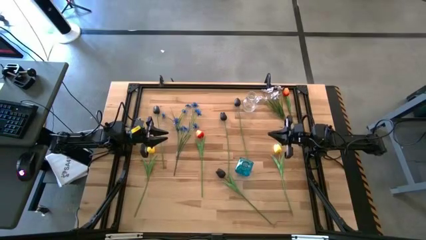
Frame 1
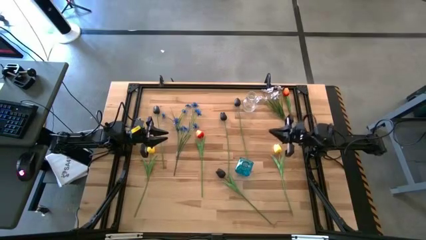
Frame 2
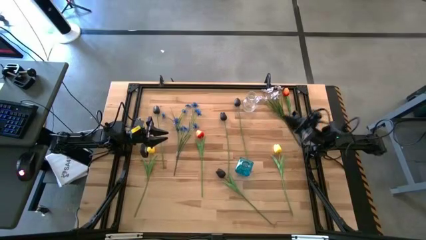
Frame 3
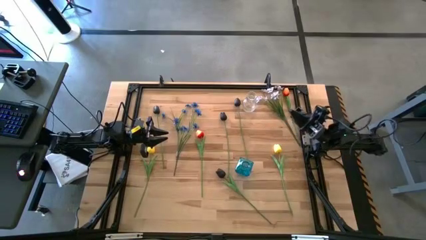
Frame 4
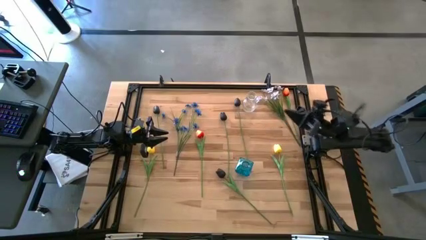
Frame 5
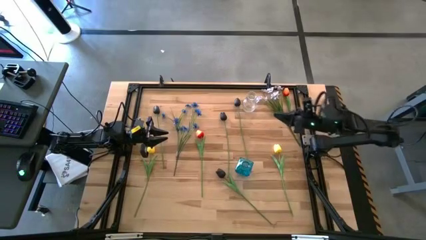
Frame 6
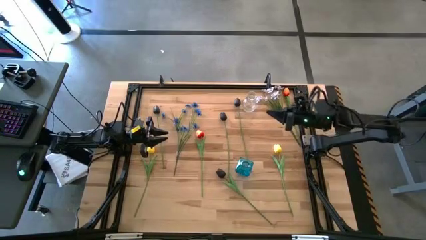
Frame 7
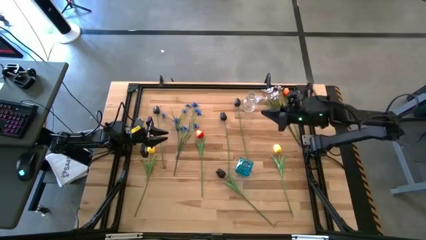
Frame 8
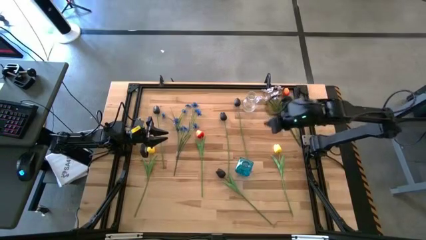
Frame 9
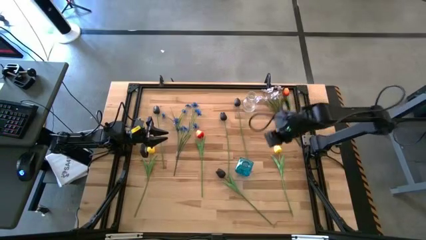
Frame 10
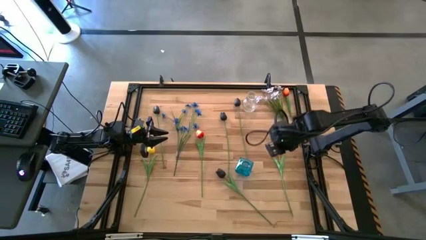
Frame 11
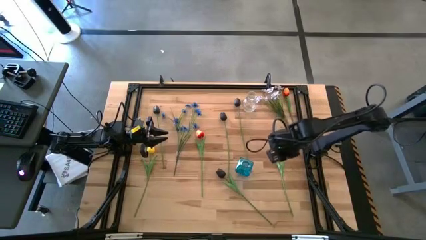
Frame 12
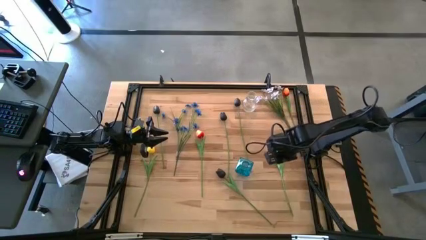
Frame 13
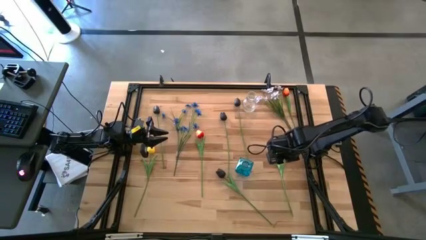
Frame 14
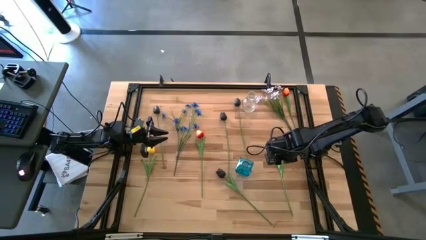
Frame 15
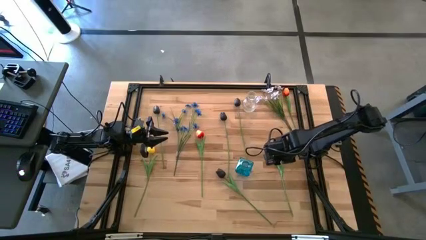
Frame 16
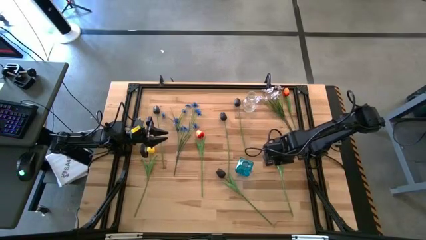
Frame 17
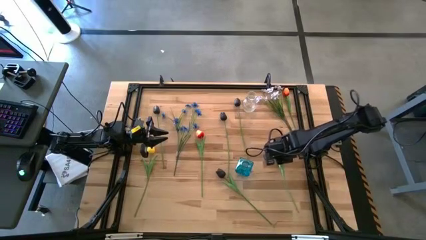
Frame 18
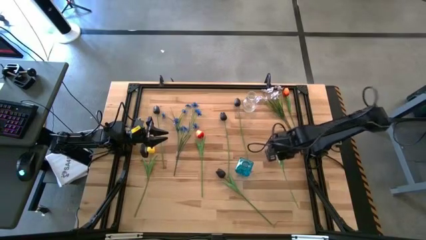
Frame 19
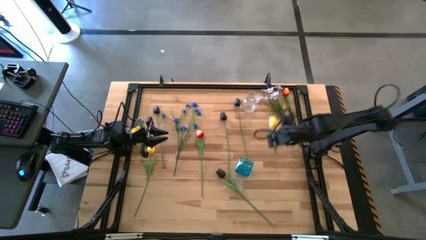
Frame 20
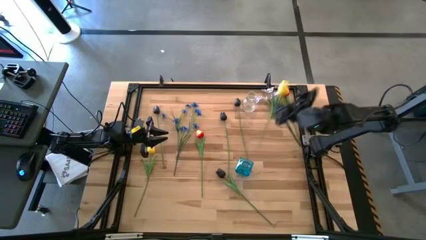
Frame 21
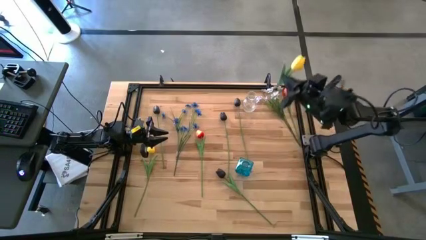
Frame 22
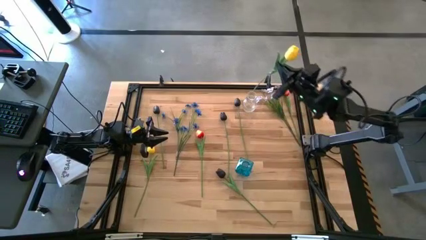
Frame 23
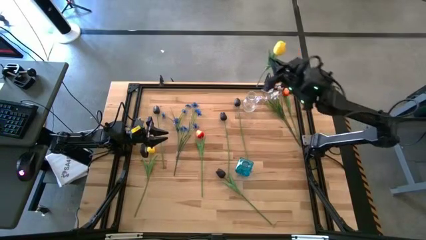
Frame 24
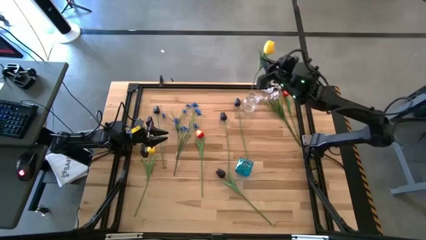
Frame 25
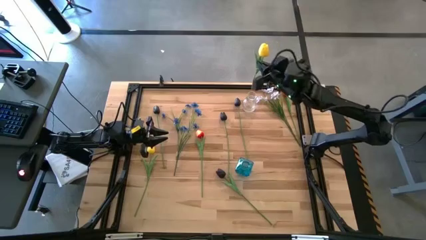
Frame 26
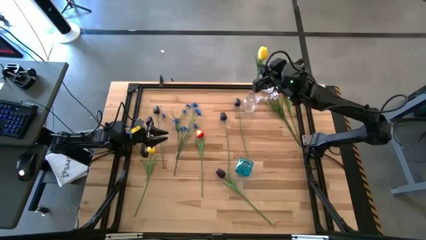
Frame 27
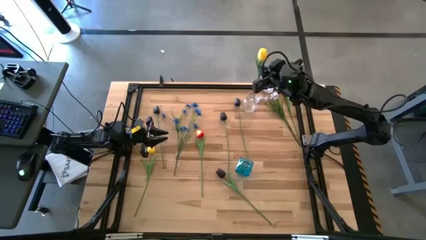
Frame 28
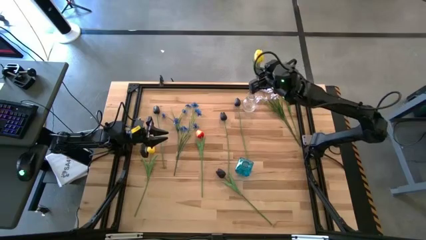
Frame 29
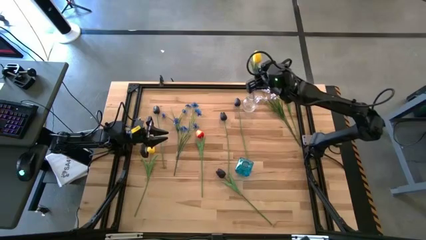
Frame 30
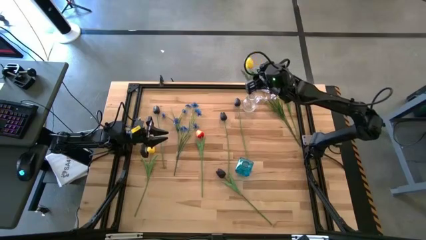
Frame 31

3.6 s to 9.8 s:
Task: Sort flowers into vase by color
Put the yellow flower into the transparent vase

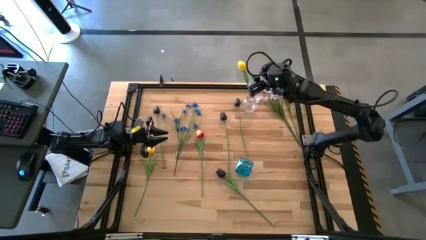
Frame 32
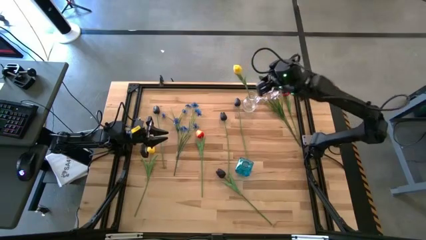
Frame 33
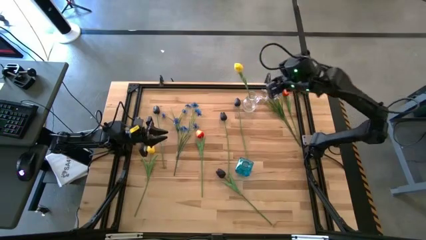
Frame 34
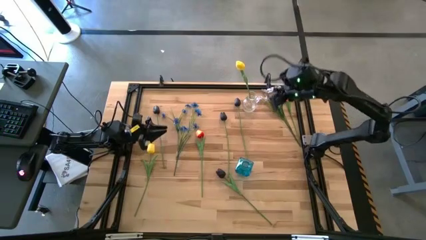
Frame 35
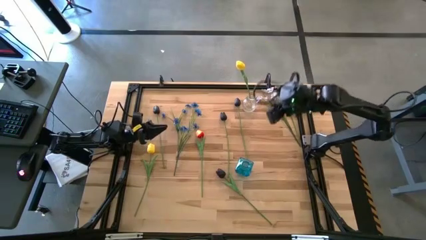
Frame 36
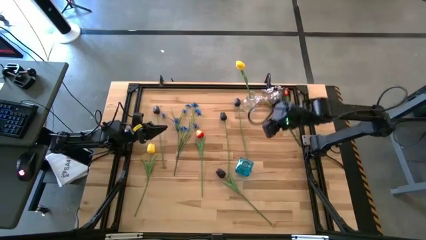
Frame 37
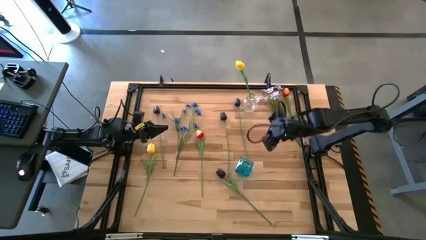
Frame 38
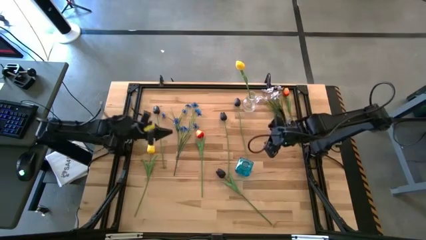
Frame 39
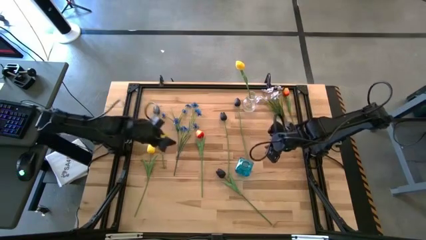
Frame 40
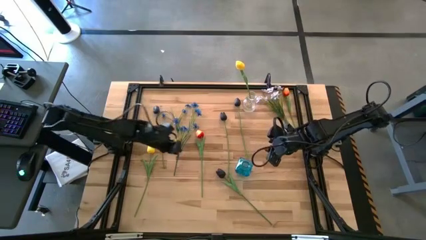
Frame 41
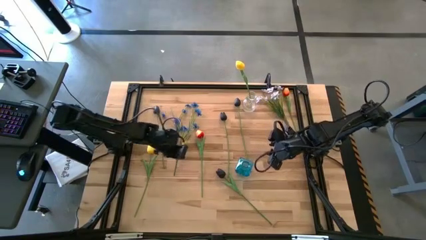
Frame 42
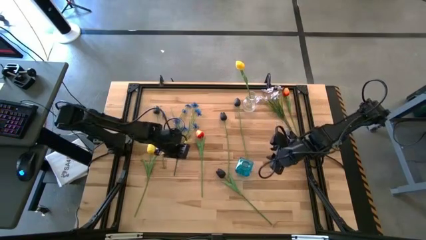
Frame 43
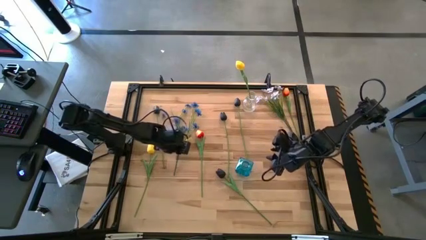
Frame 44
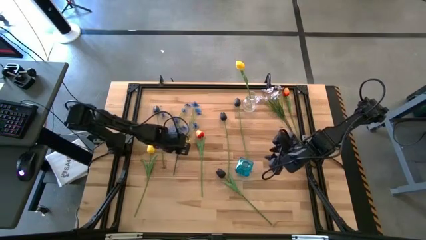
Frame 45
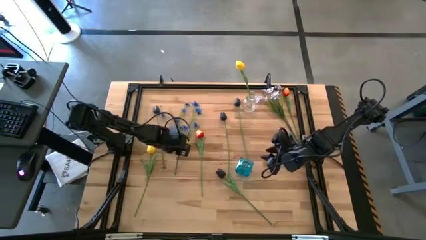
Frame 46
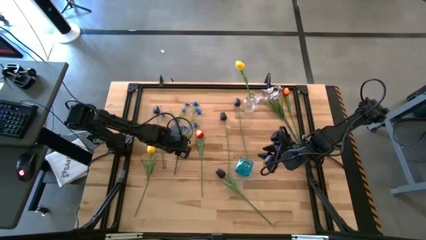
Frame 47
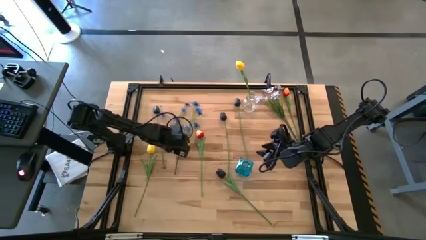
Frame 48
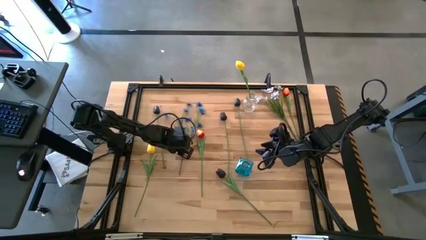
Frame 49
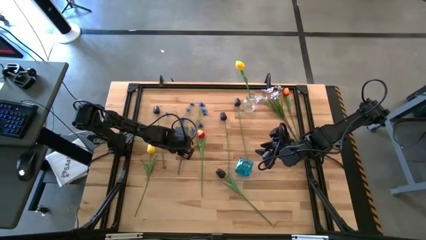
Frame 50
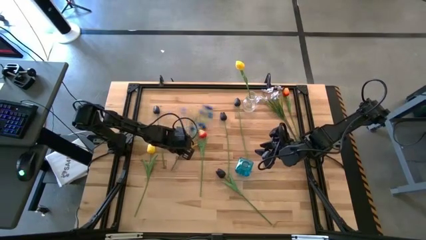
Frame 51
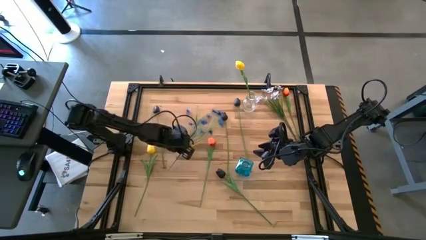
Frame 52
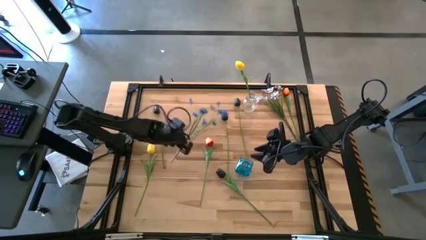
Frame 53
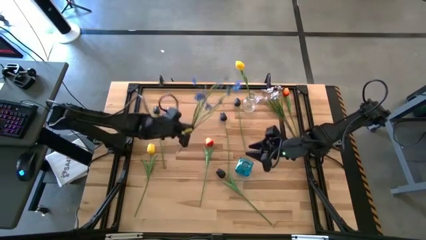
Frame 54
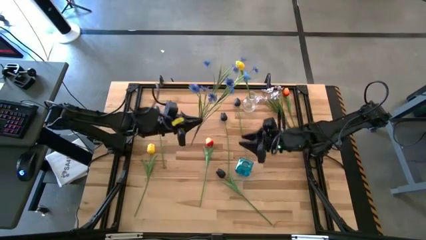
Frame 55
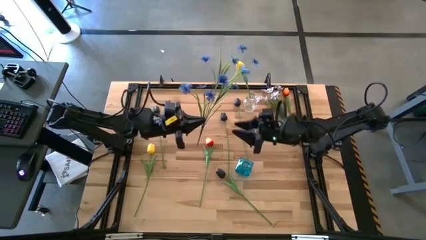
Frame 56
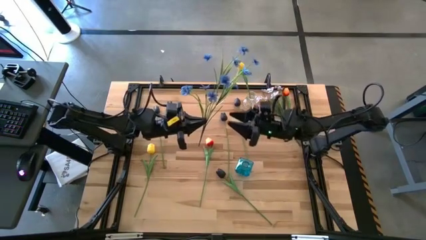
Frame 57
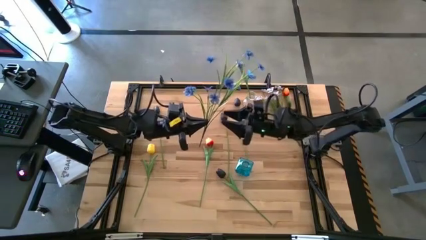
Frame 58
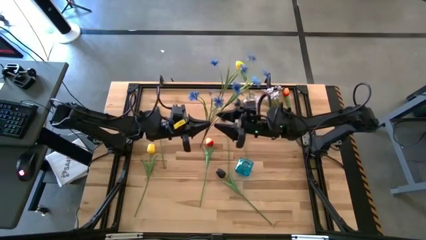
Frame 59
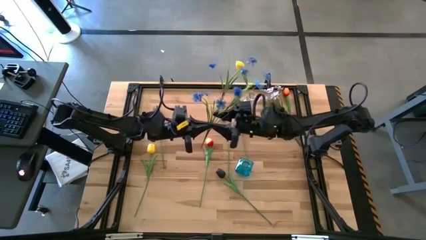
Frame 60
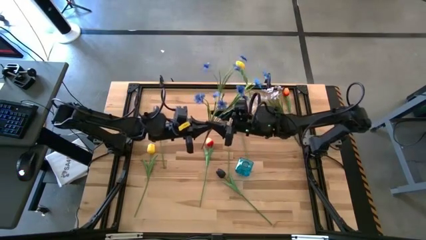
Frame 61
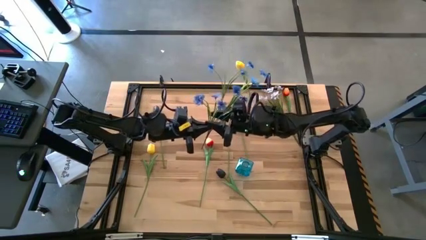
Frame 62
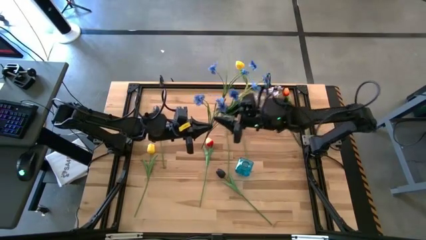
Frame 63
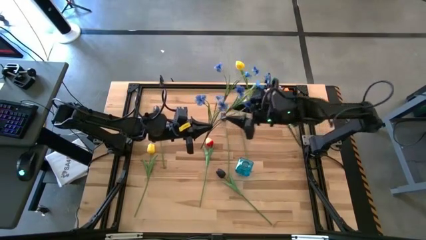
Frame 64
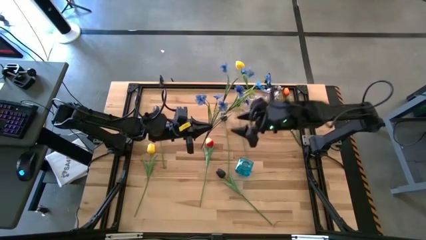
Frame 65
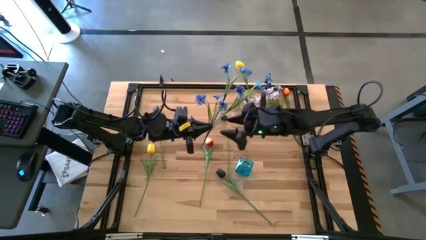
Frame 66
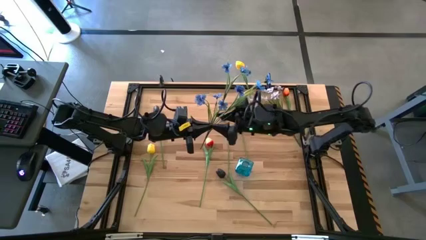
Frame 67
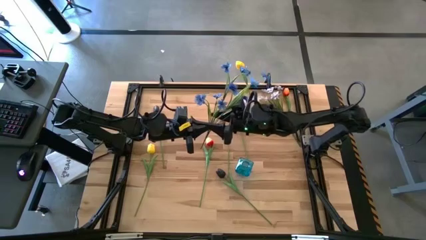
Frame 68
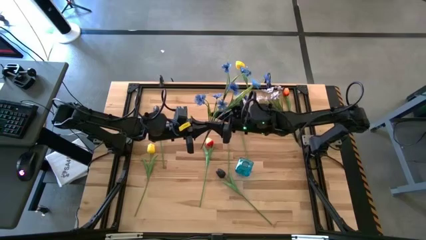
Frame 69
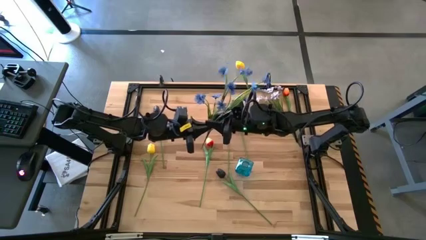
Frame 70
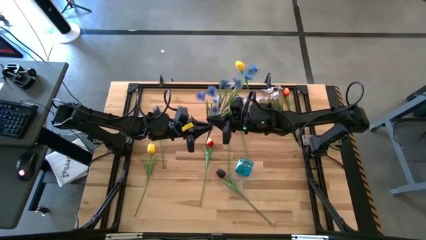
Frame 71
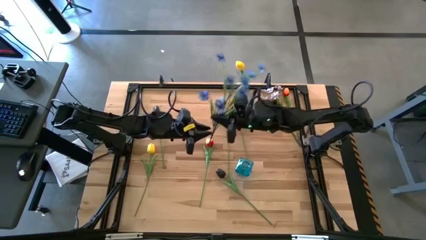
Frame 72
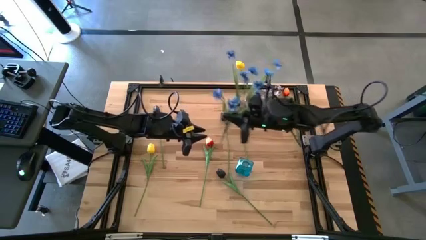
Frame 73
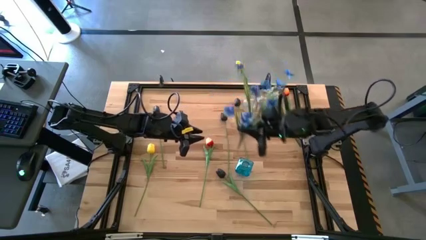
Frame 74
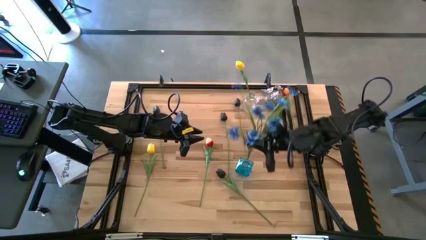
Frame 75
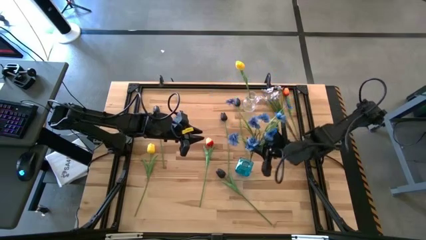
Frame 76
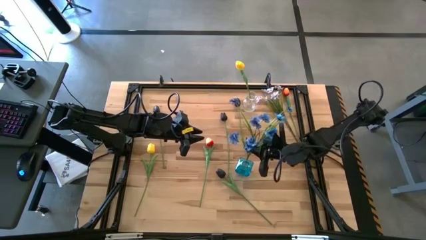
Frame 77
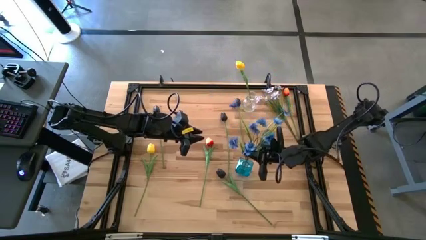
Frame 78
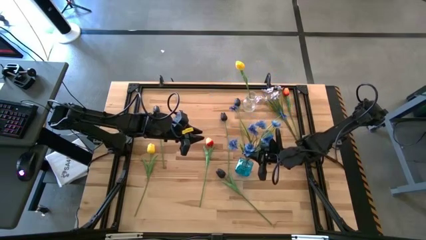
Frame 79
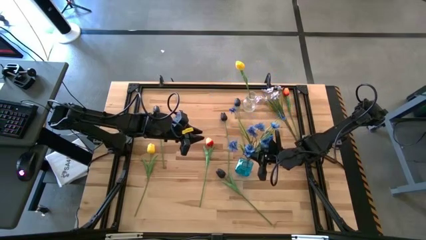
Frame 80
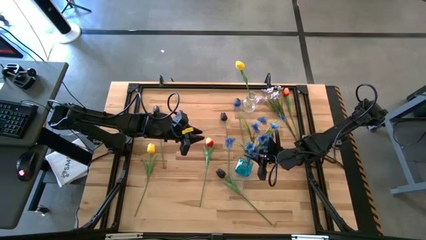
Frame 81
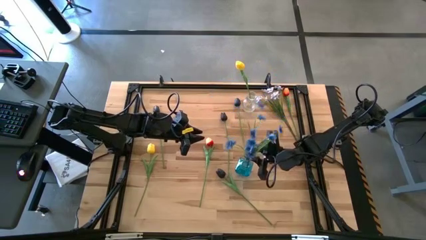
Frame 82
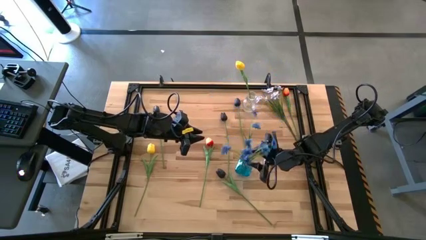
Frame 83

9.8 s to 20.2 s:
Put the blue flowers into the blue vase
